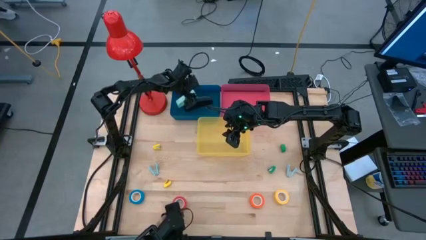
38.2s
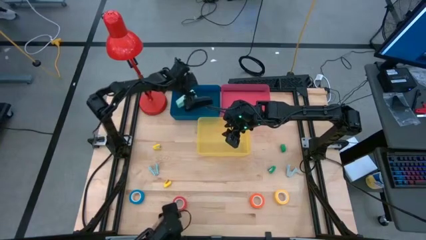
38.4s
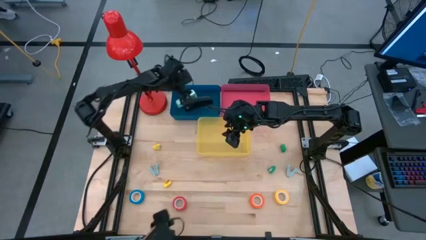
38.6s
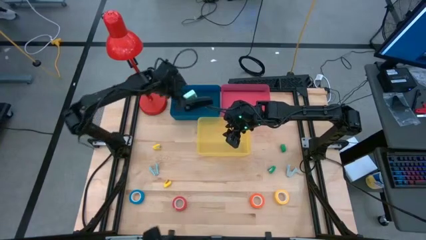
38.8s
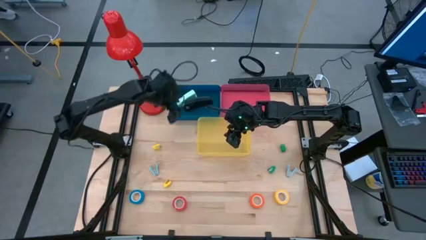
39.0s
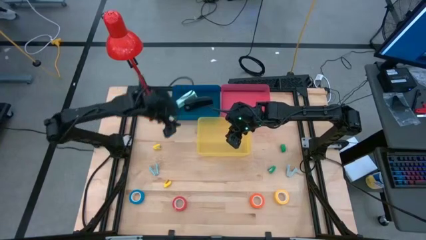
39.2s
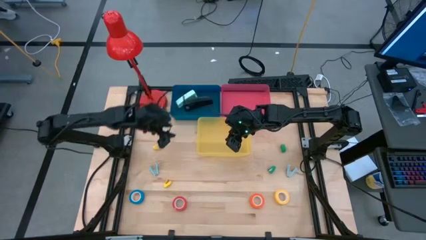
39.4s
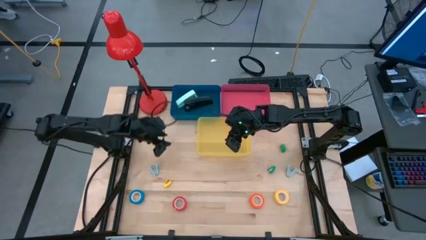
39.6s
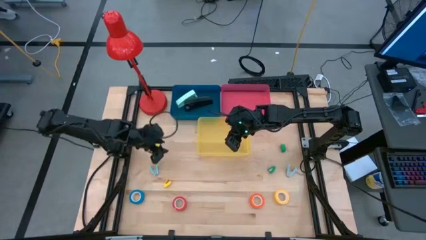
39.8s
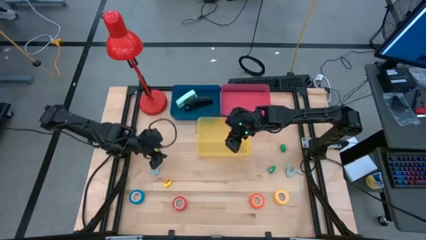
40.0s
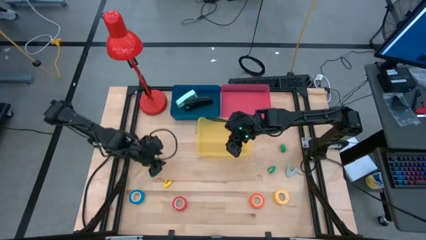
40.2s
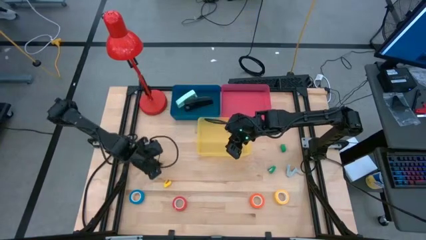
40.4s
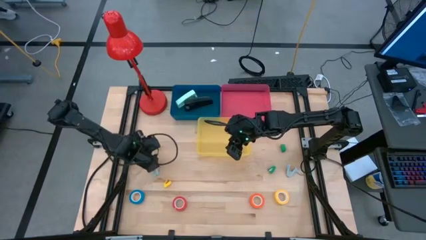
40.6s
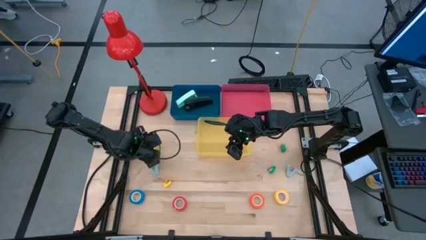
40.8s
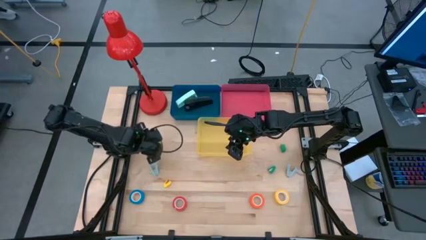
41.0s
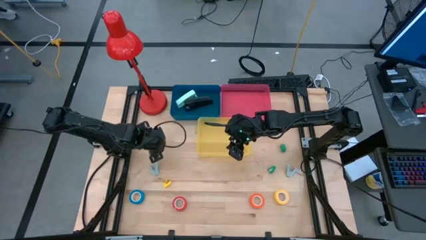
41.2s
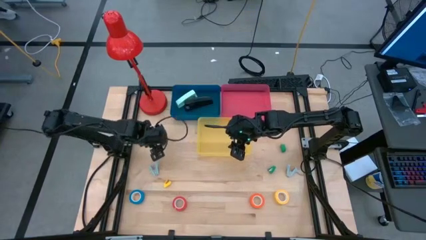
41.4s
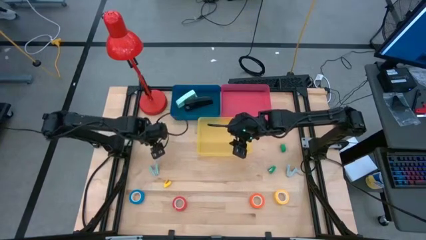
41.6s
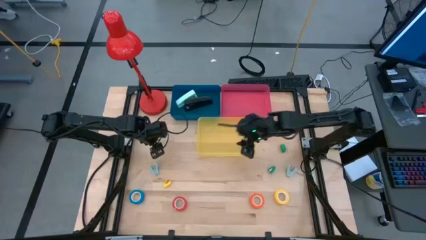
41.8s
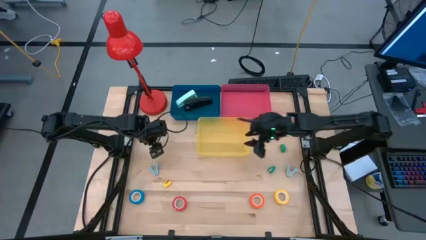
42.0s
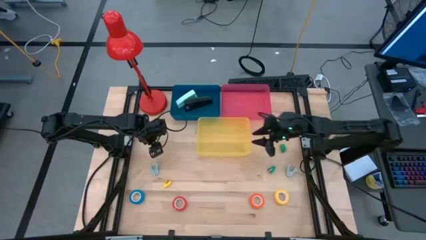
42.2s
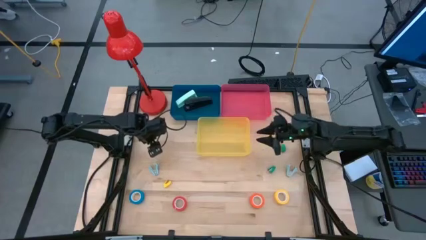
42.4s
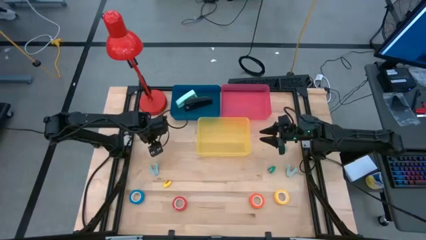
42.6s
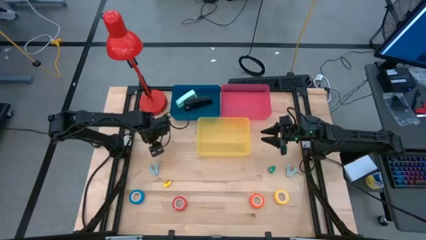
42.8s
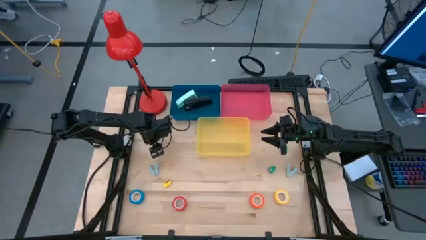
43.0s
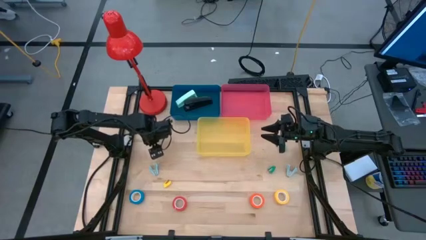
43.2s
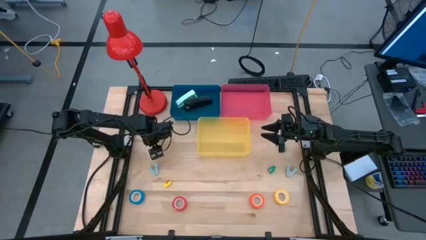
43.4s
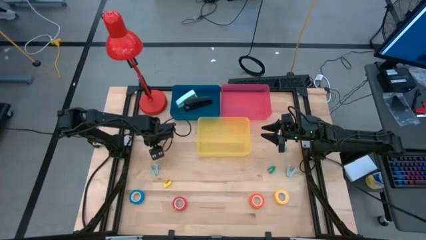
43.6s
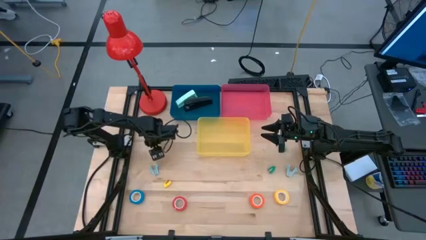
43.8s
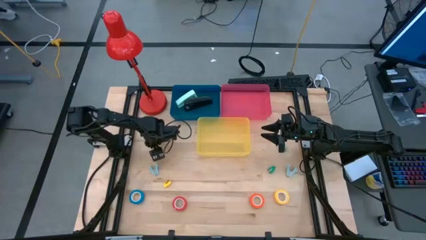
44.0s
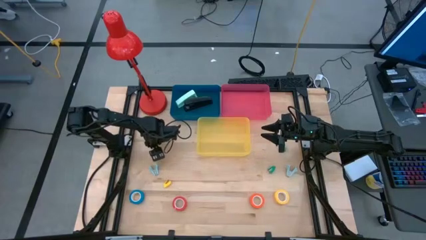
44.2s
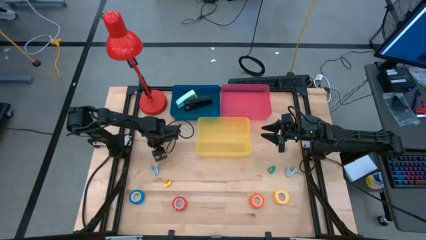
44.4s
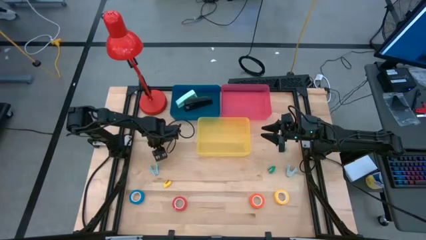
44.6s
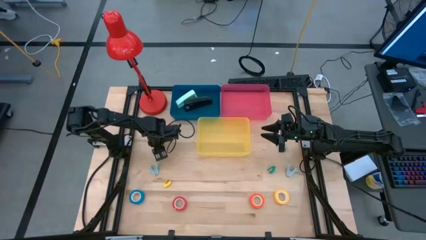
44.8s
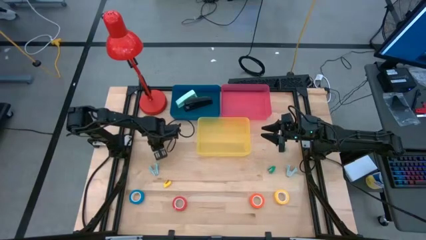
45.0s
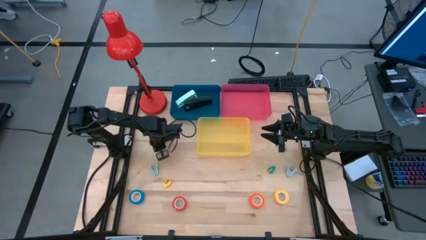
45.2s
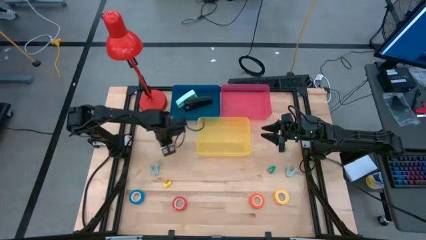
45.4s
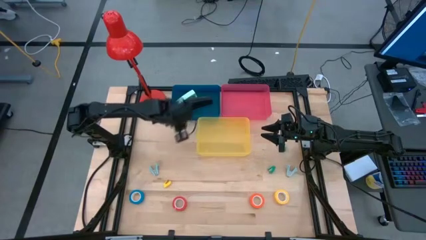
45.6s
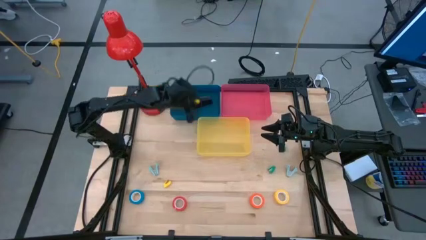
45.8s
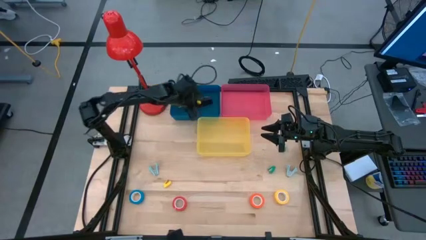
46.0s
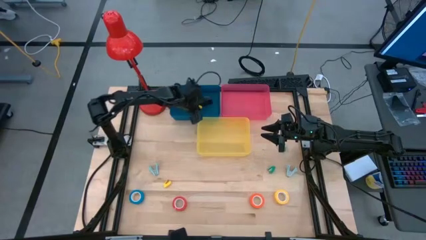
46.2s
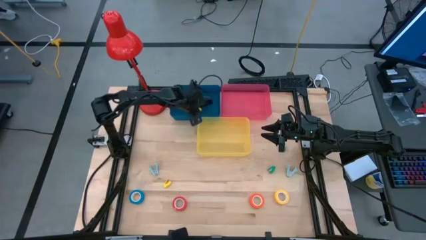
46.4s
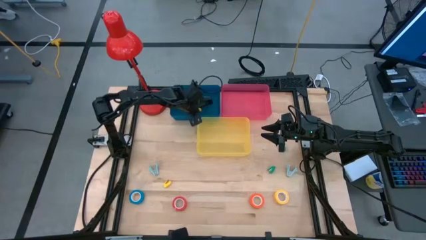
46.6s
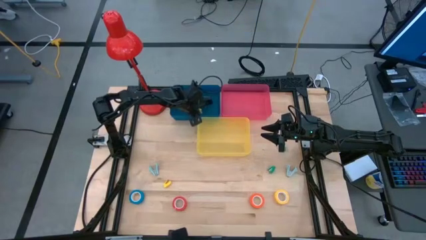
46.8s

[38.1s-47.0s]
Task: Pick and place Stapler, Stapler remover, tape
Put the yellow stapler into the blue bin

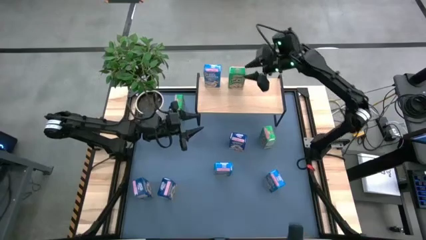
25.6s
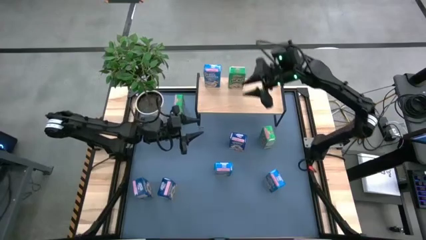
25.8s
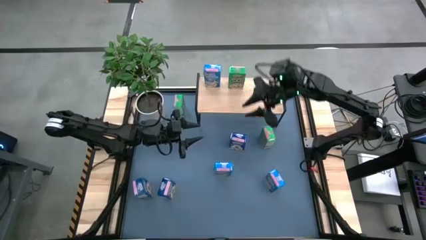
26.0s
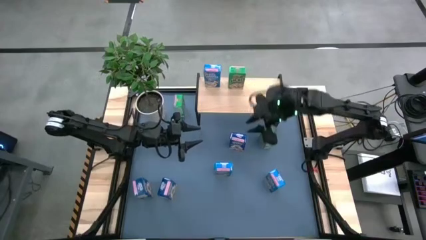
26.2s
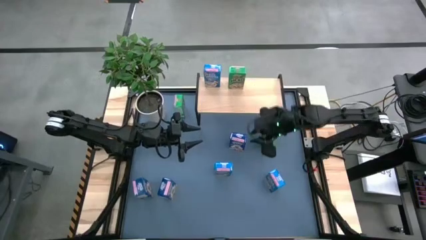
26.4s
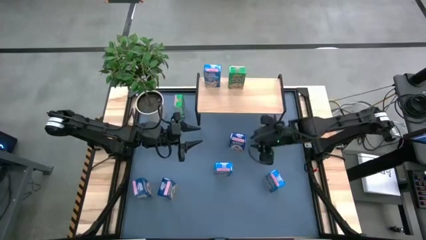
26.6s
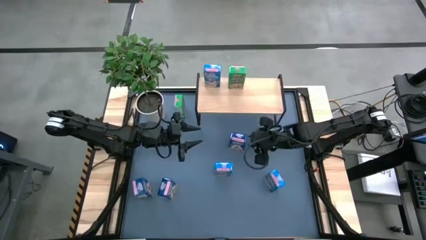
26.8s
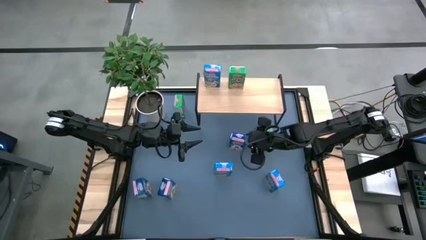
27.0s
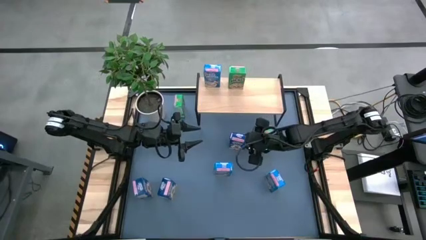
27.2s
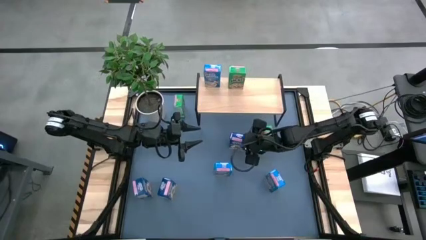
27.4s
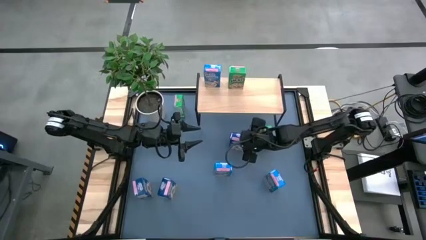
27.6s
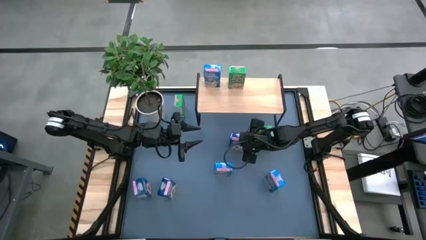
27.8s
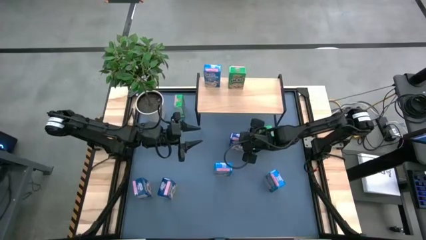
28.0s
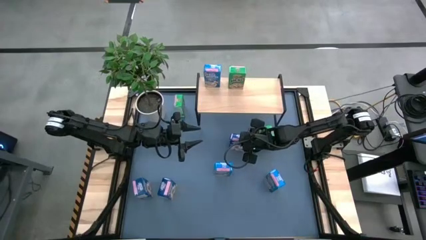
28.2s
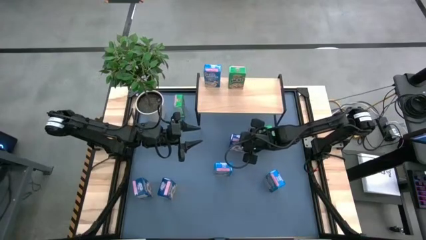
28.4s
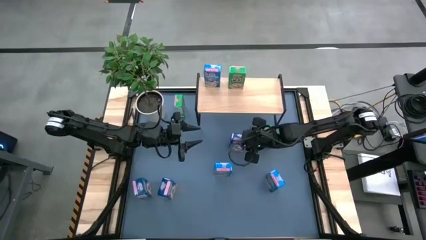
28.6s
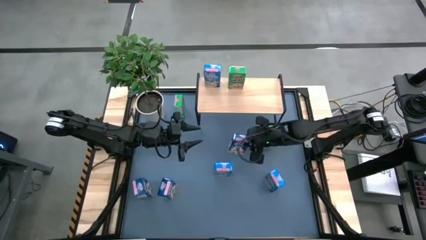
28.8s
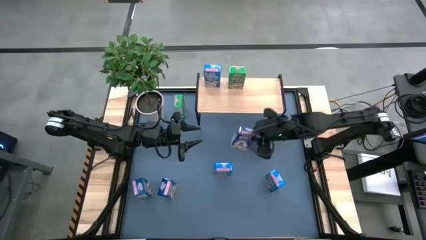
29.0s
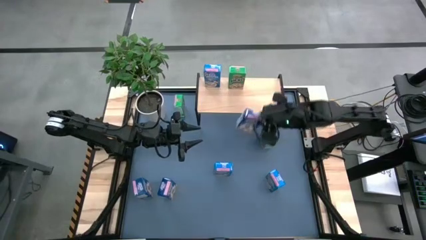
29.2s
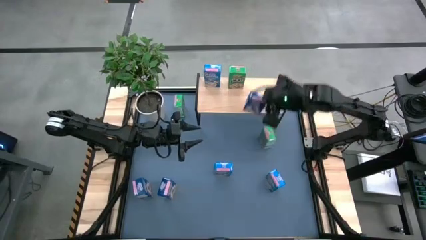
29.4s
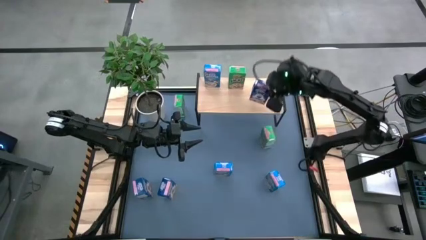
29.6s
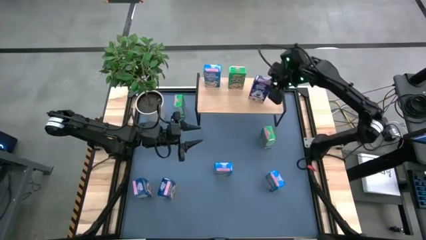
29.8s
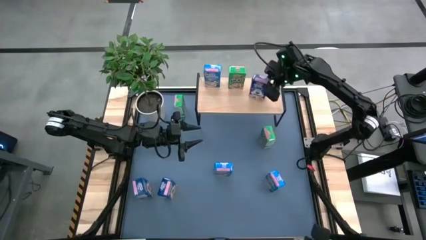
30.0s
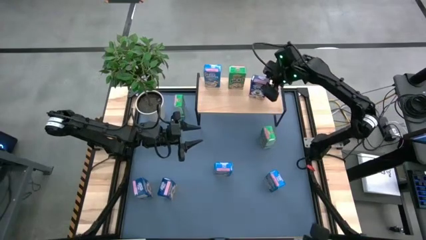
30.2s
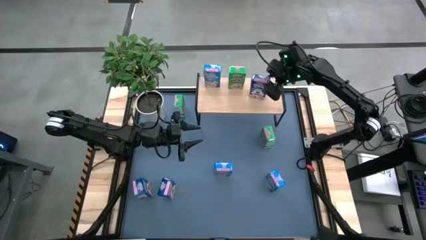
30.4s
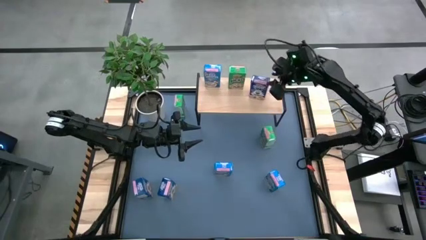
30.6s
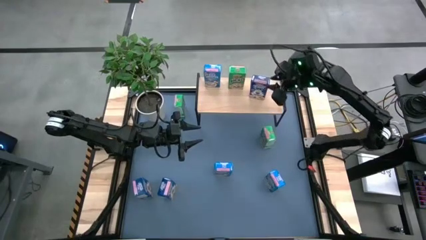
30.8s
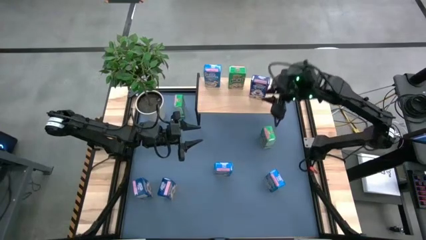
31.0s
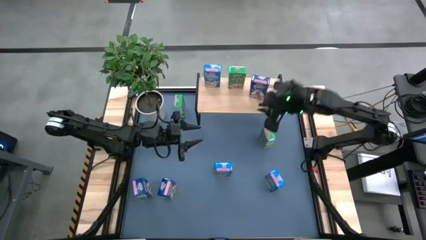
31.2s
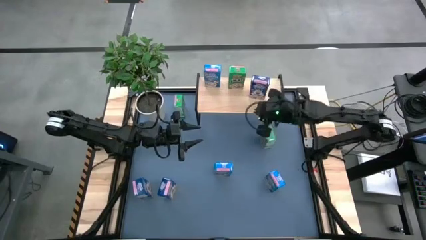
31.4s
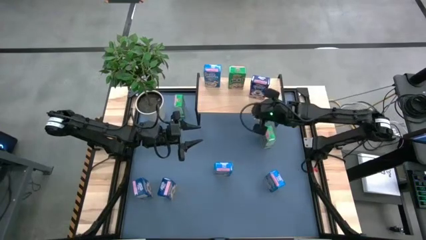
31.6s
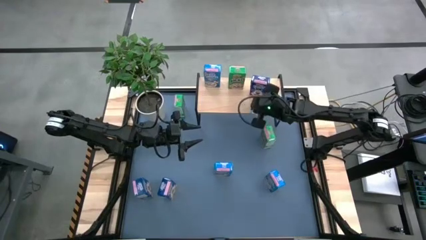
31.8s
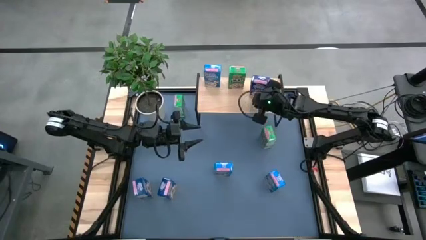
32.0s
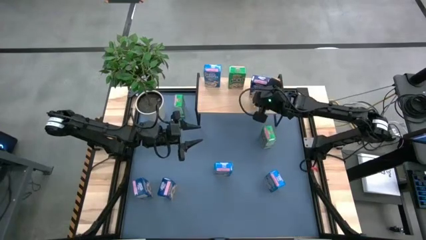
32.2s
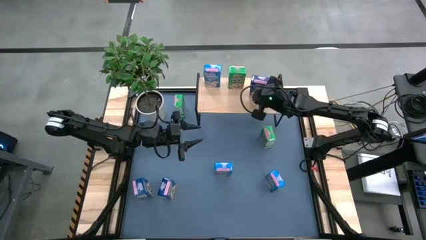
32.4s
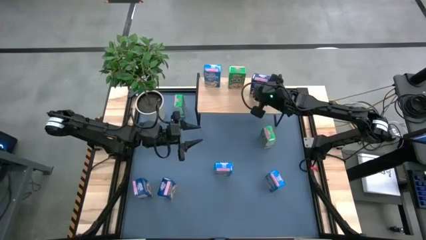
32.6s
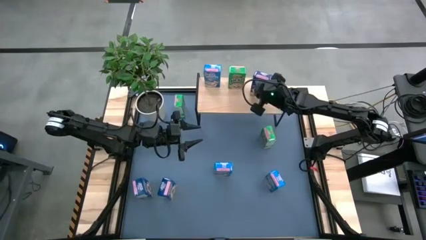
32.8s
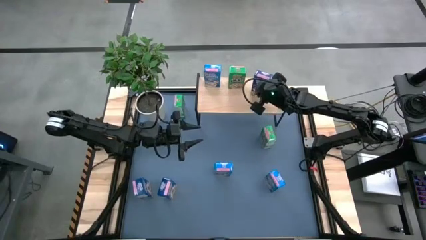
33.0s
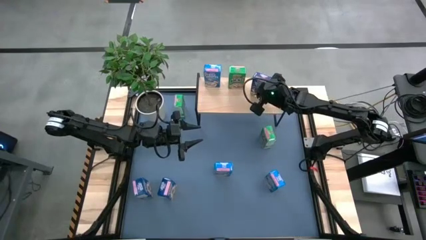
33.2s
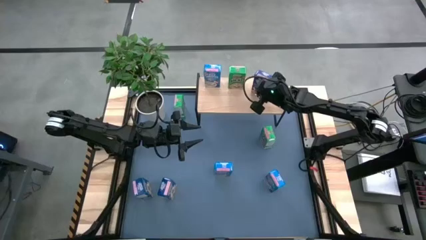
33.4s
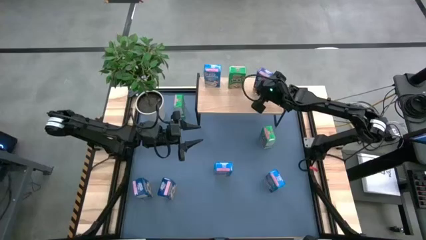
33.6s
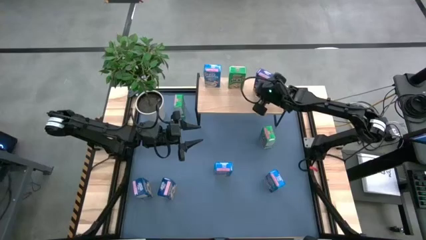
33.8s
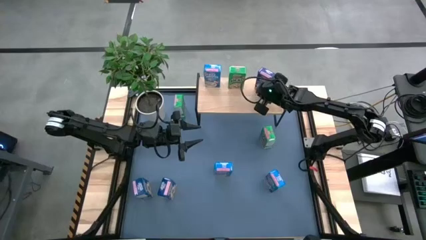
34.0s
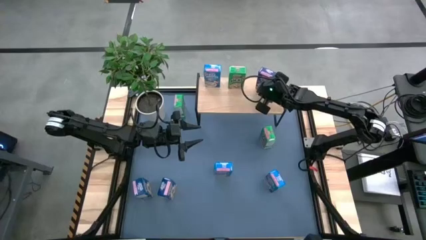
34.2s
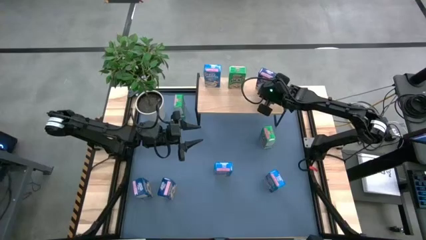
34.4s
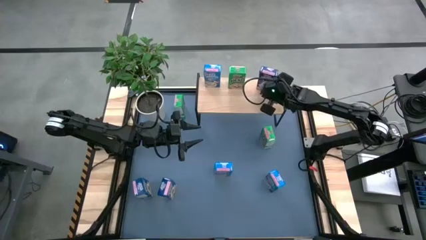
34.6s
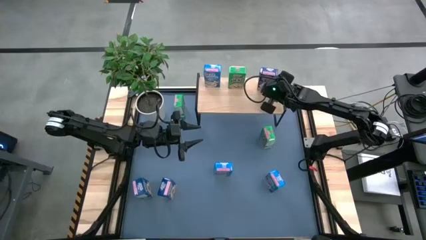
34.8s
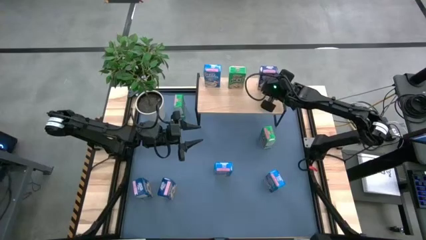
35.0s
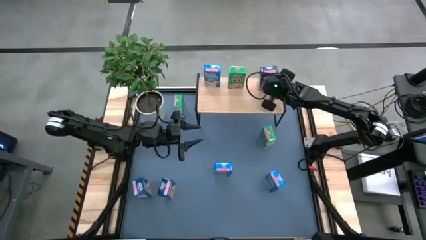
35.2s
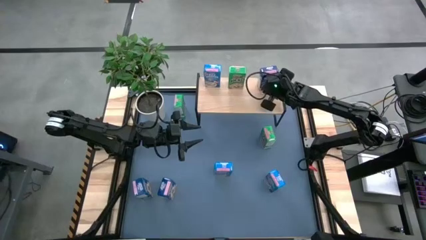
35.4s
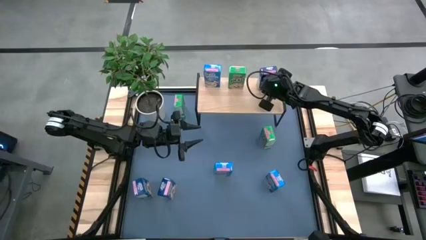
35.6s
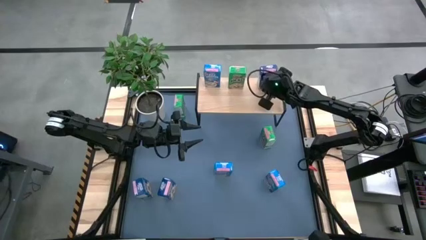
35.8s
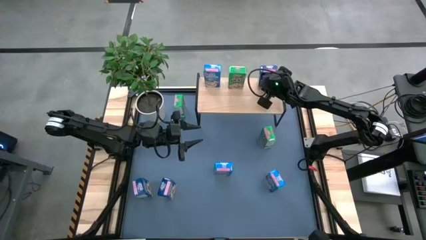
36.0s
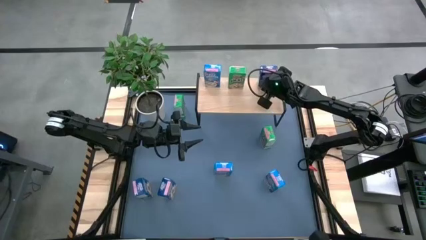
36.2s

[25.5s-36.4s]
Task: Stack cereal on shelf
Put the top blue cereal box on the shelf
